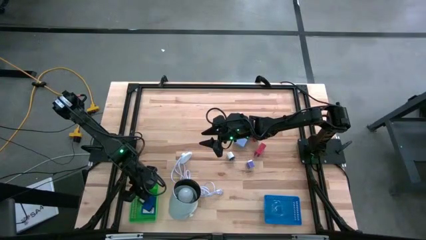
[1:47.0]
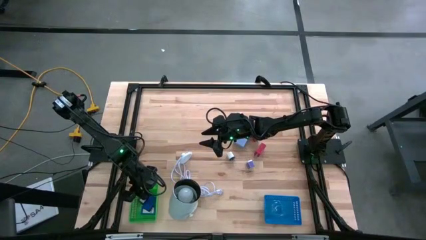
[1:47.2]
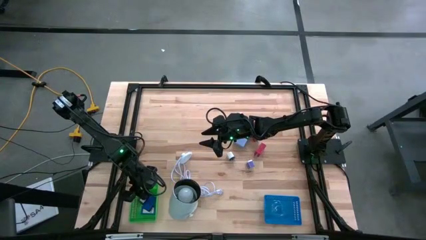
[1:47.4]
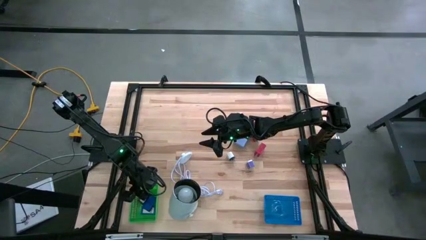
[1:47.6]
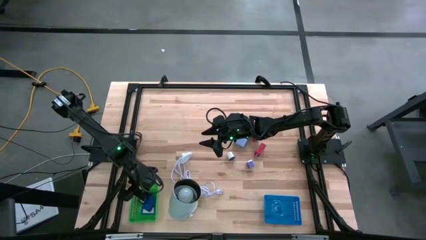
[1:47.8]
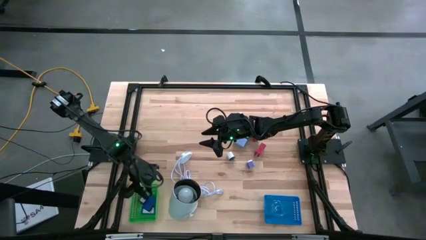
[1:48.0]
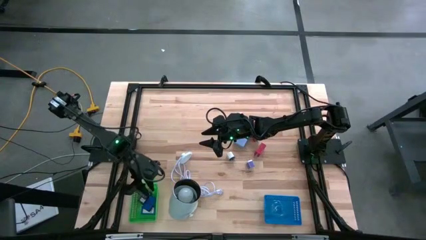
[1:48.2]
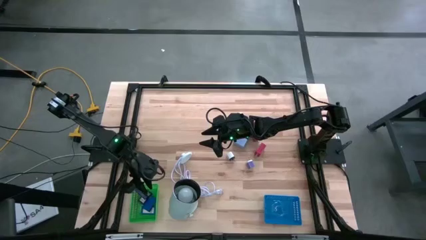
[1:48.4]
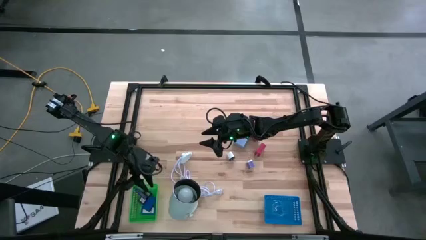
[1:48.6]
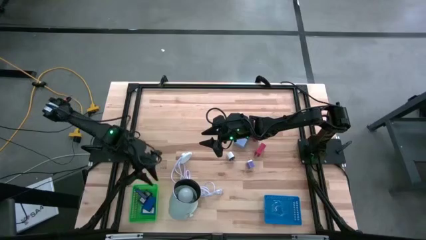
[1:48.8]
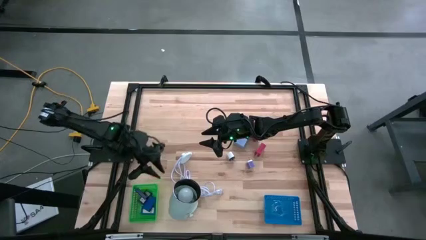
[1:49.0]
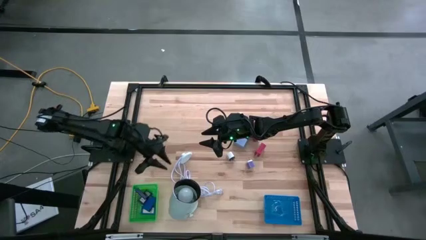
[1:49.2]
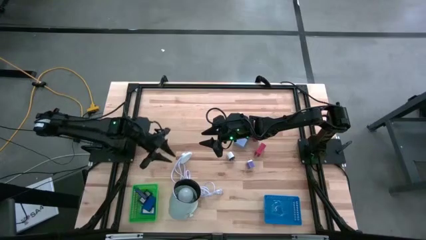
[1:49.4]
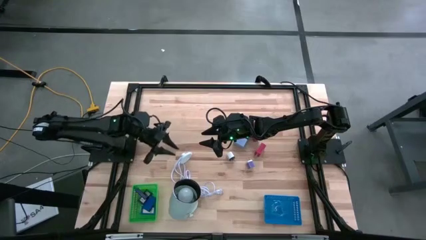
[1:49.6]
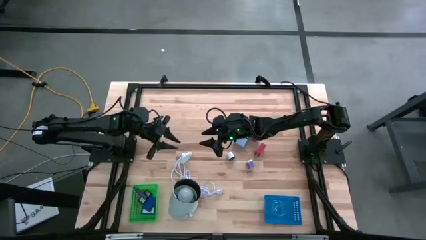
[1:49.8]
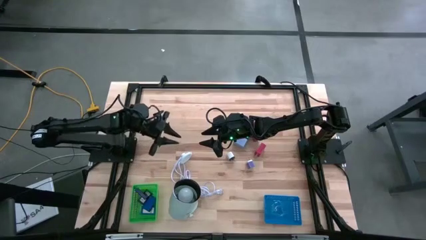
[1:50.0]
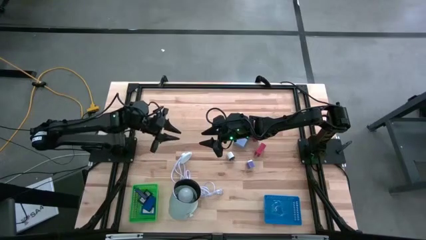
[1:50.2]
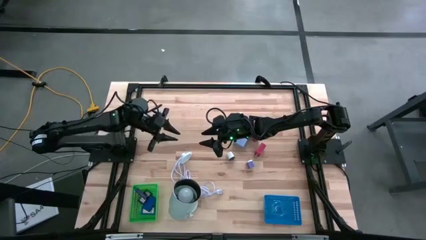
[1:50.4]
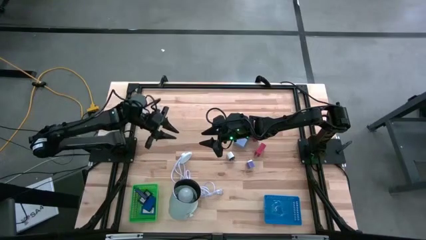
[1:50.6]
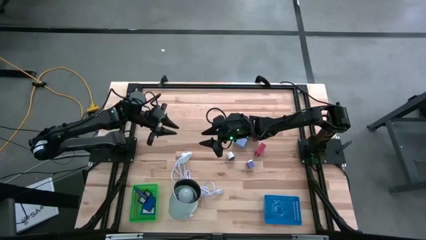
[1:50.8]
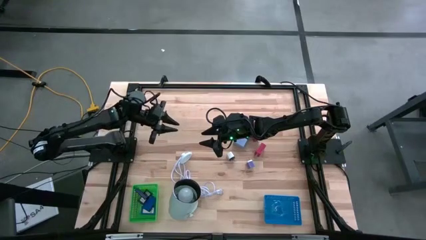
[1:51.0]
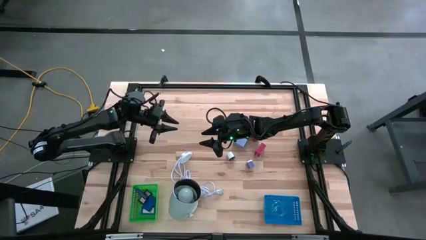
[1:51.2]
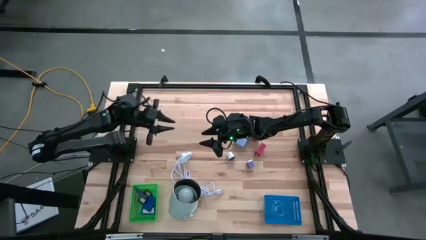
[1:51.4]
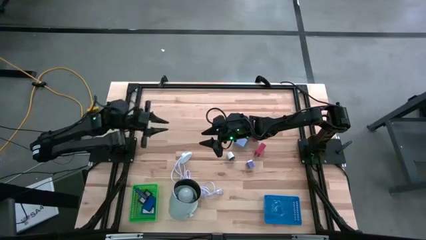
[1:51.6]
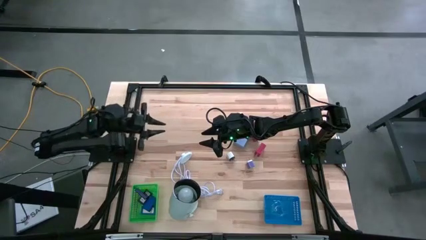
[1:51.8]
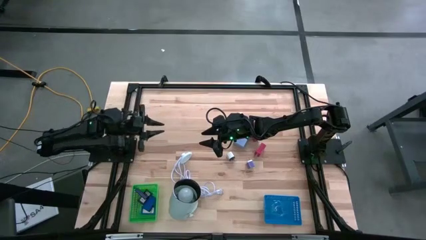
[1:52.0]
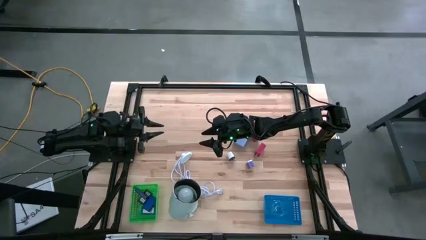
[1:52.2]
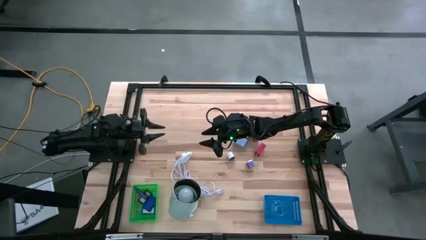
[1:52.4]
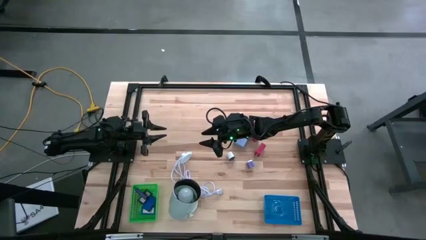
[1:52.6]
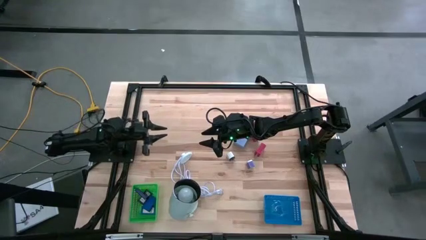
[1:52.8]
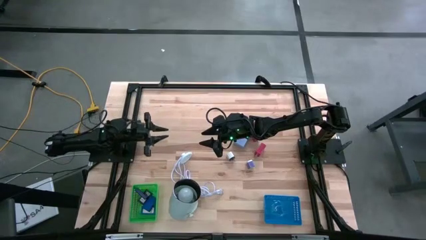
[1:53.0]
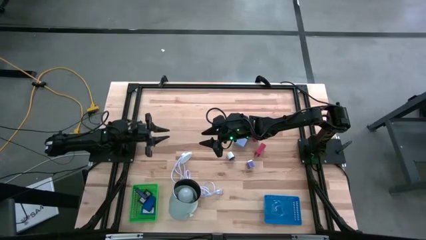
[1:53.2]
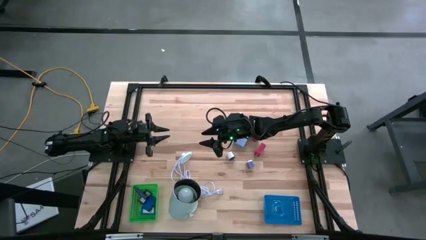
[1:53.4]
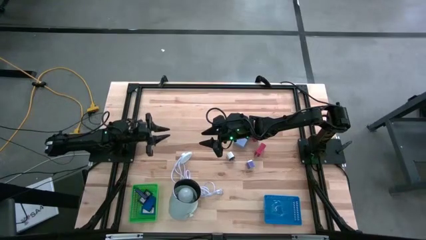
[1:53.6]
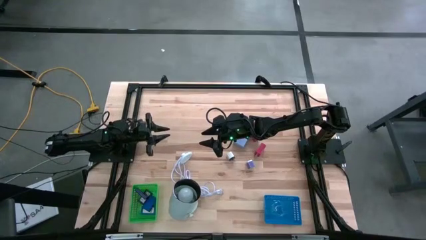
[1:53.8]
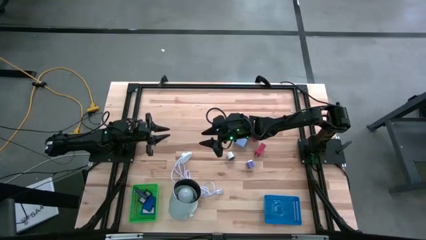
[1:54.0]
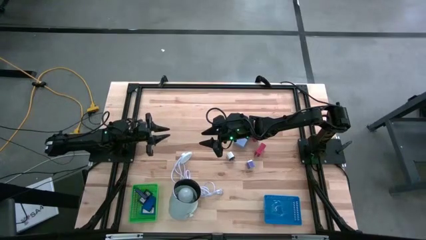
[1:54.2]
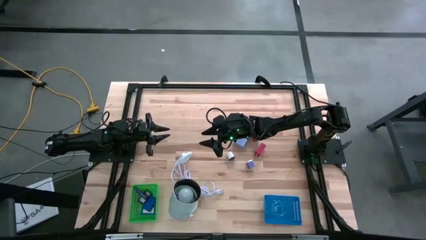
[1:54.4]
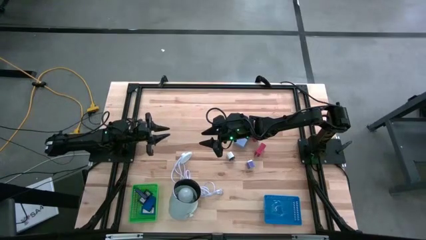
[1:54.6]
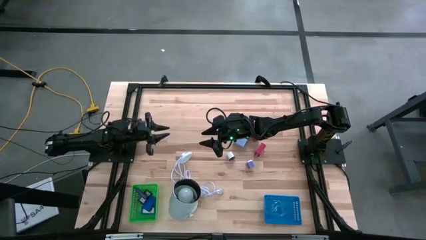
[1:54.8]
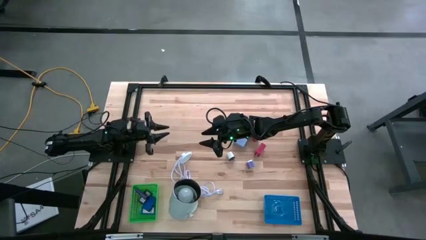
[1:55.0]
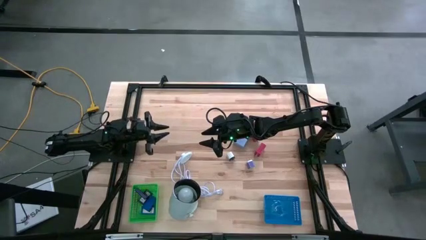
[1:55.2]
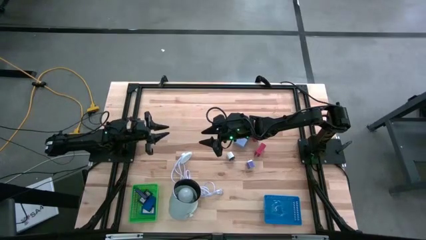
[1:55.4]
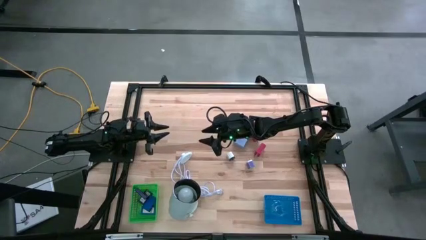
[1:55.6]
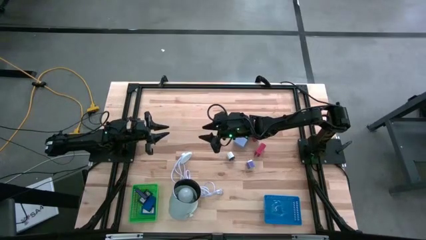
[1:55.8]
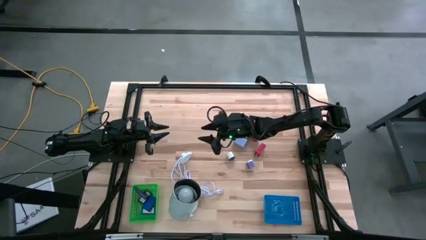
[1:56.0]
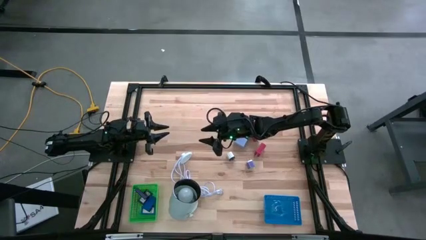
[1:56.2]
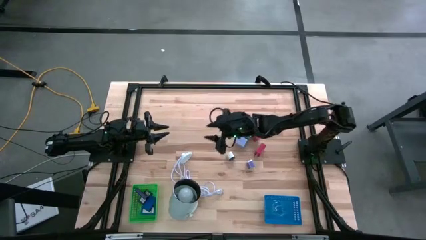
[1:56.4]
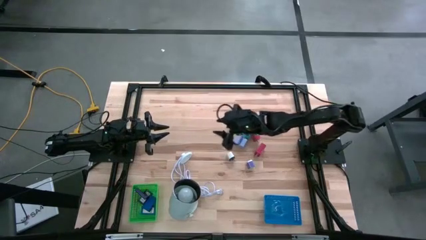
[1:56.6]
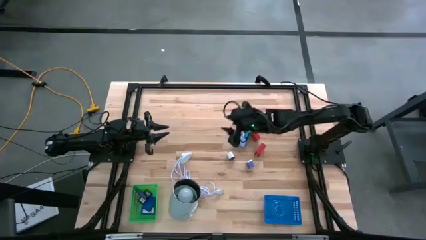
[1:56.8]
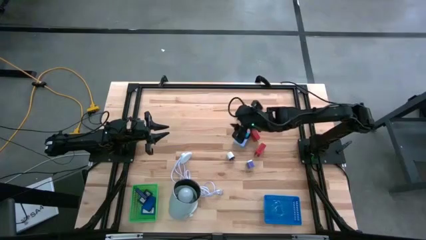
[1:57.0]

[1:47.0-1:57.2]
Task: Pick & Place Office items
Put the top red charger adapter into the blue basket

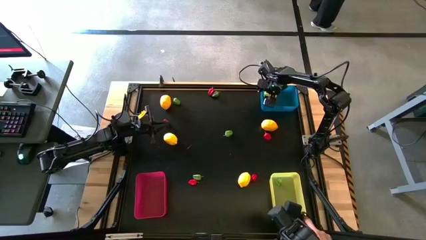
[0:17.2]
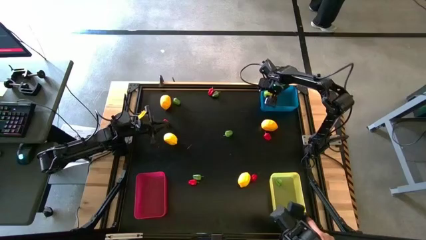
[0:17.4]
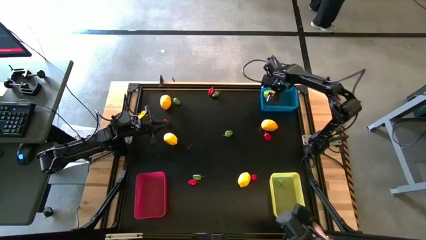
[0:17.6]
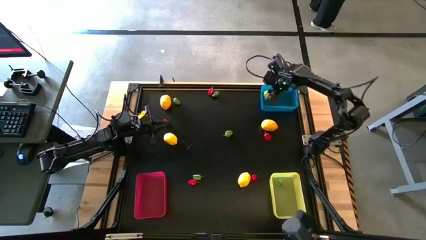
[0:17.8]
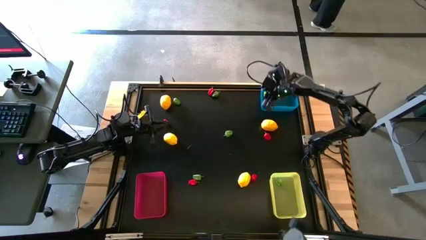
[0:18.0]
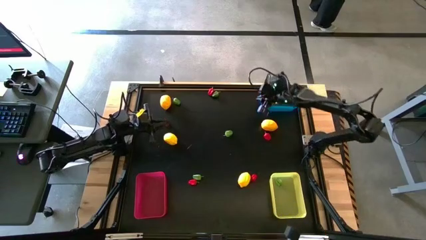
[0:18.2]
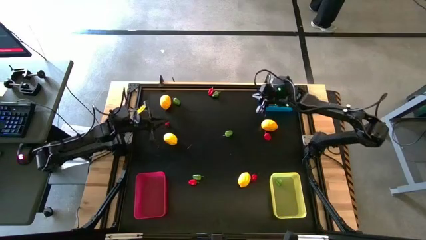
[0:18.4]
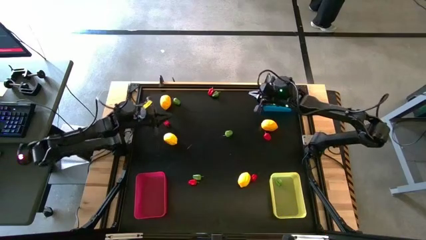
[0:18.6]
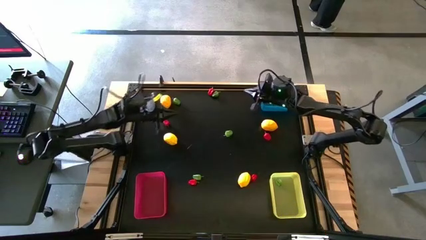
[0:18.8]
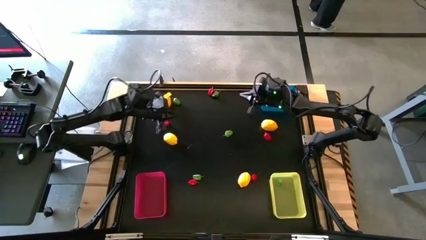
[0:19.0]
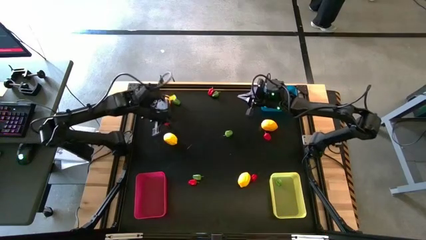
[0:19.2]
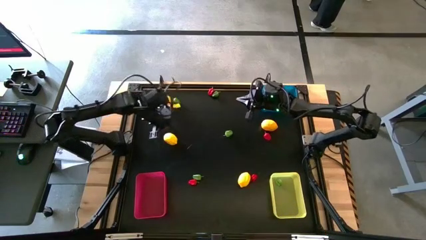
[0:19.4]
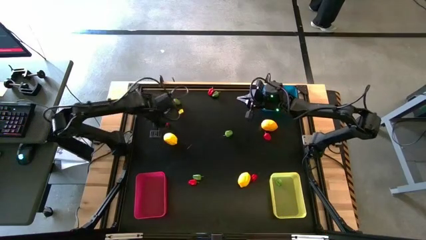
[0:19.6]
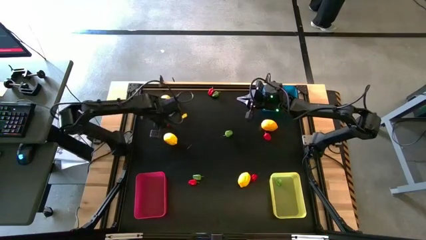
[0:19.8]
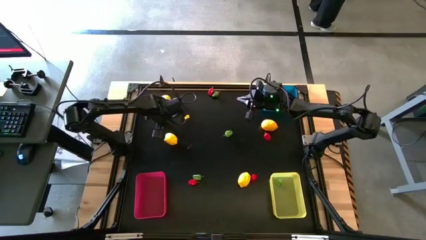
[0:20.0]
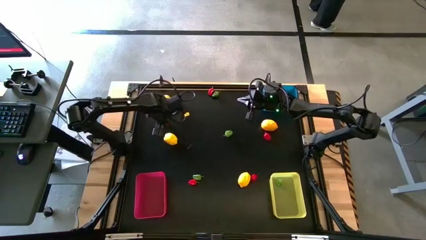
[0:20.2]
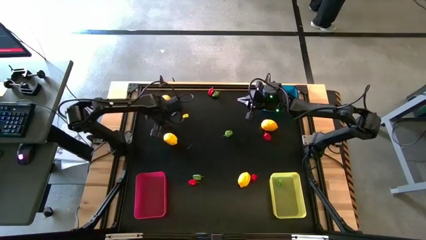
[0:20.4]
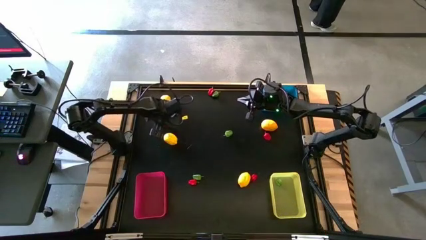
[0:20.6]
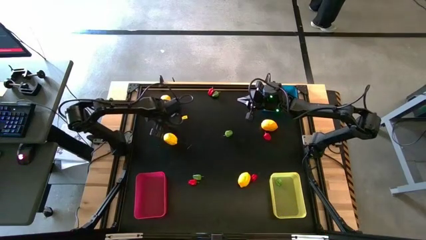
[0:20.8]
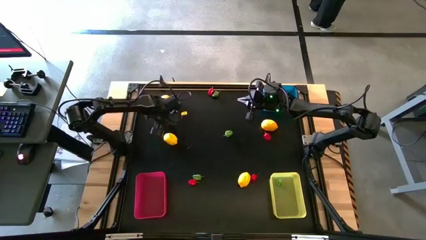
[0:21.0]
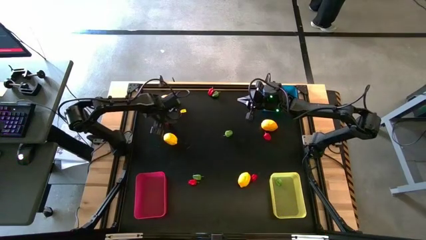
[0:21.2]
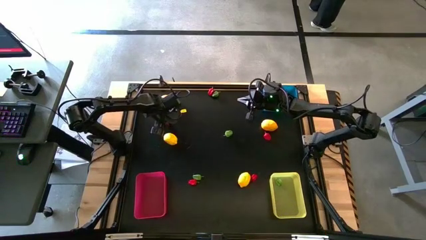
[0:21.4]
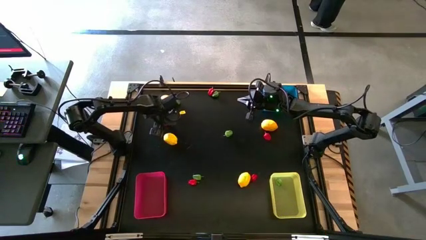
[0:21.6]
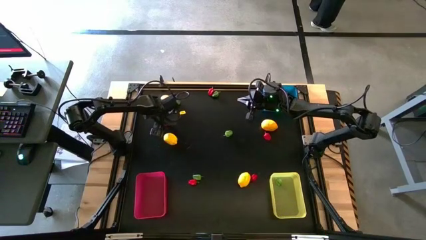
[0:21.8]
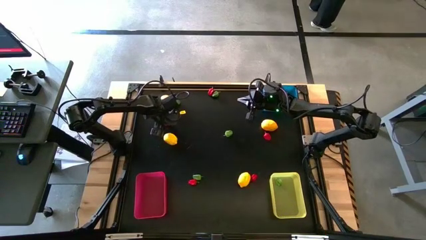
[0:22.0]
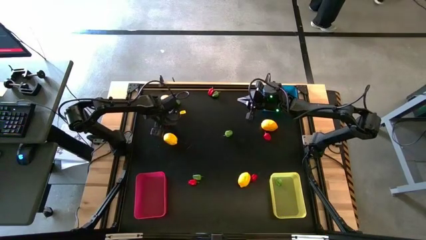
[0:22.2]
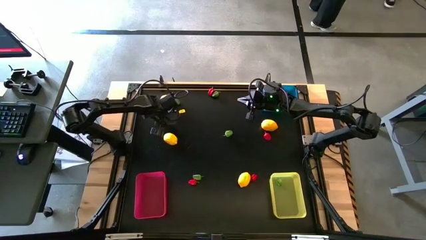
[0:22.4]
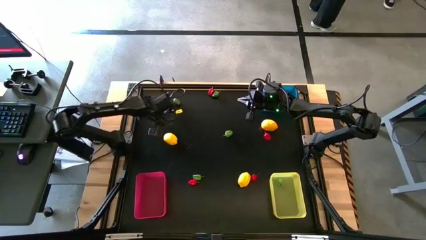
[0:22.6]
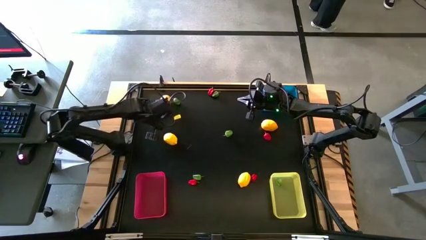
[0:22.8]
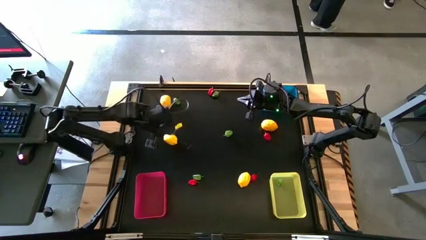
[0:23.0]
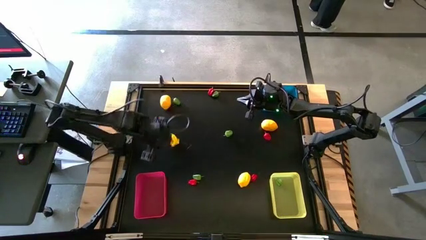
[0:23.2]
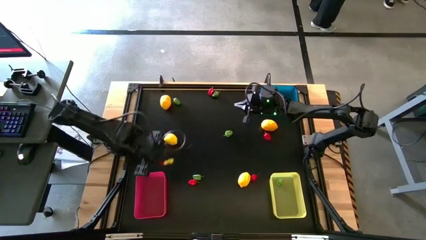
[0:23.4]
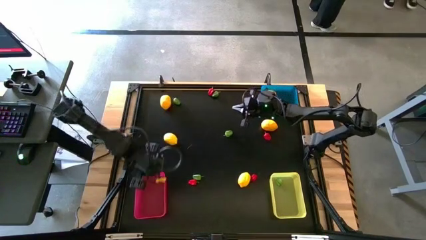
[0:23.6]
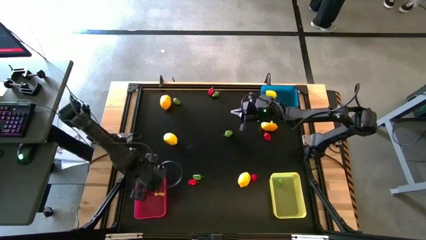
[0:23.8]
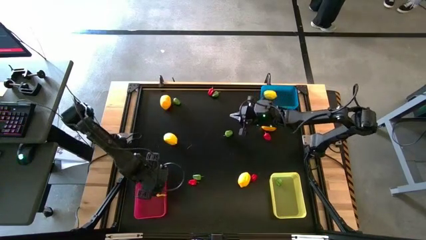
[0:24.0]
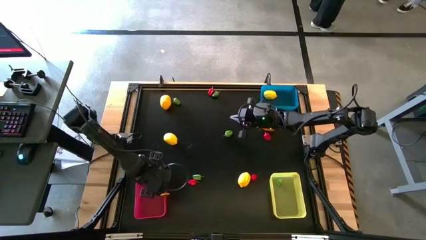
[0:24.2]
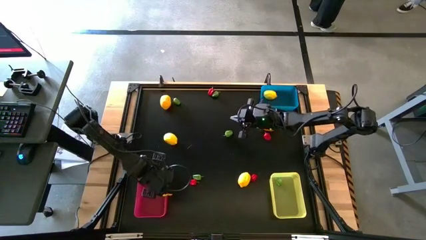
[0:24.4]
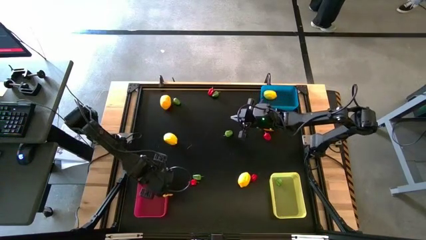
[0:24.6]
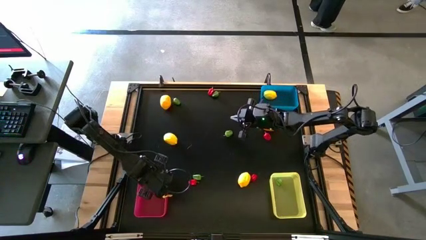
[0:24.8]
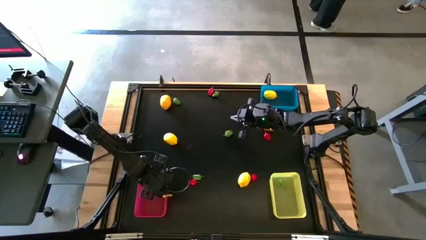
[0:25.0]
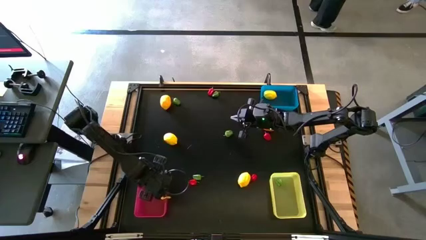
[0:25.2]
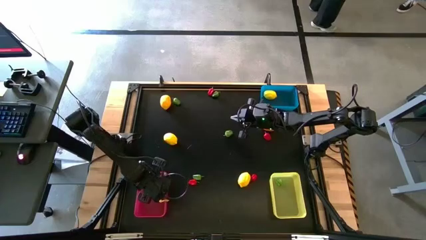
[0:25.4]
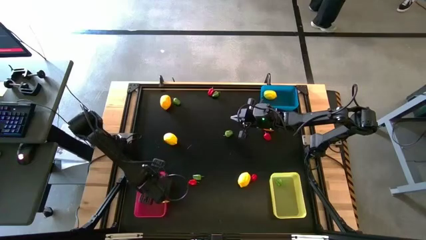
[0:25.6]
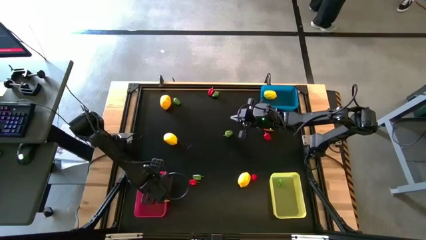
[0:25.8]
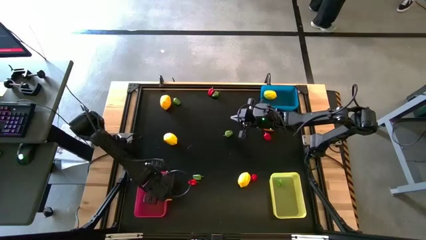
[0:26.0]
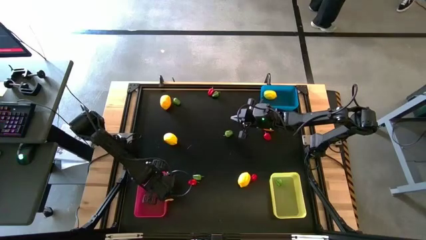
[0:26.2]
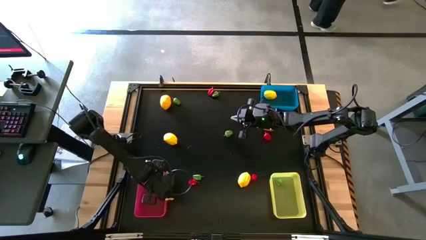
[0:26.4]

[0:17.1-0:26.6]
Task: Sort produce into baskets
Put the red chili pepper into the red bin
